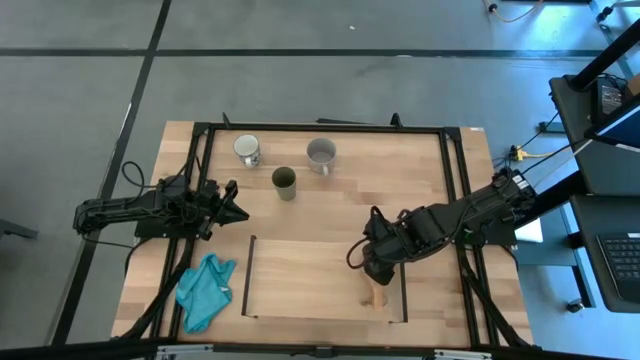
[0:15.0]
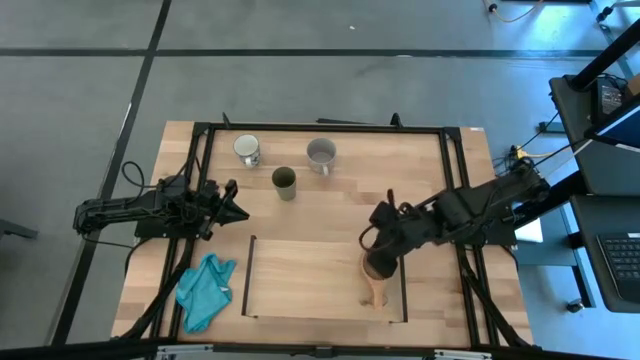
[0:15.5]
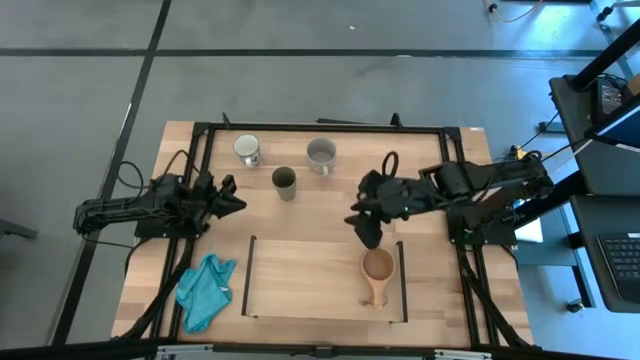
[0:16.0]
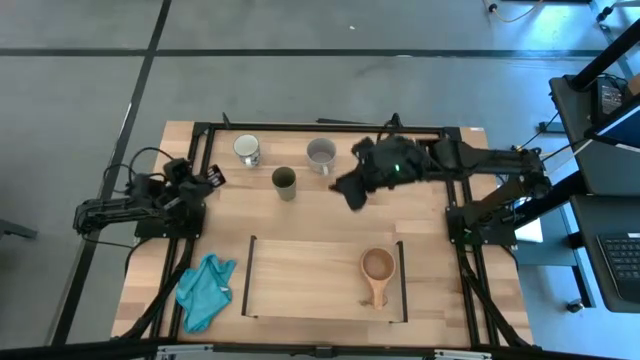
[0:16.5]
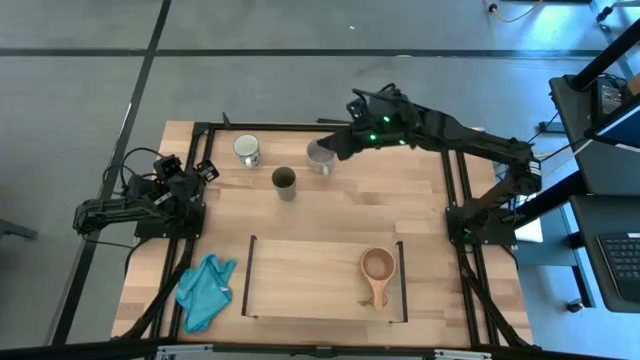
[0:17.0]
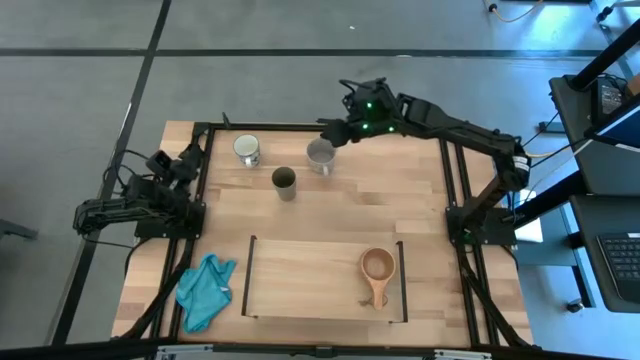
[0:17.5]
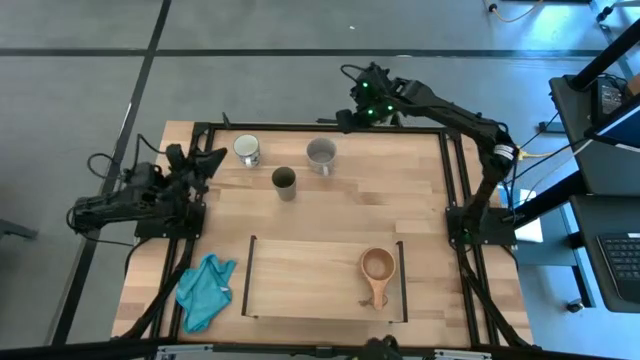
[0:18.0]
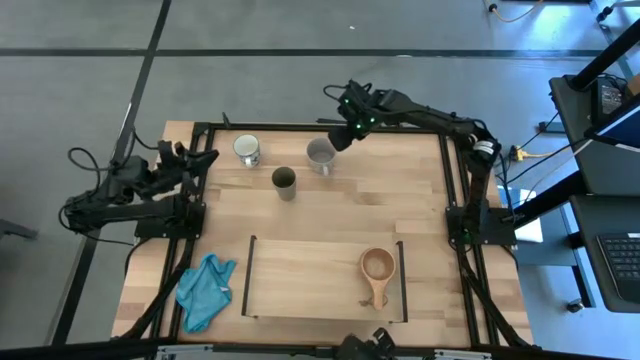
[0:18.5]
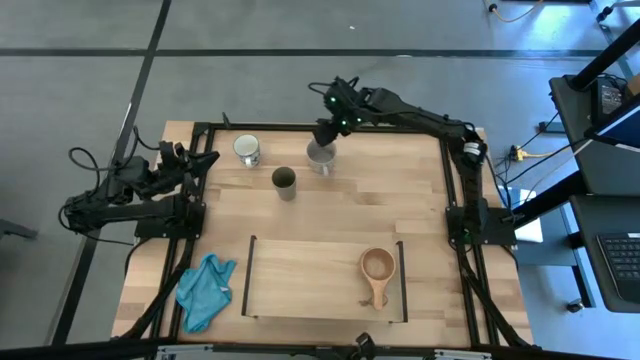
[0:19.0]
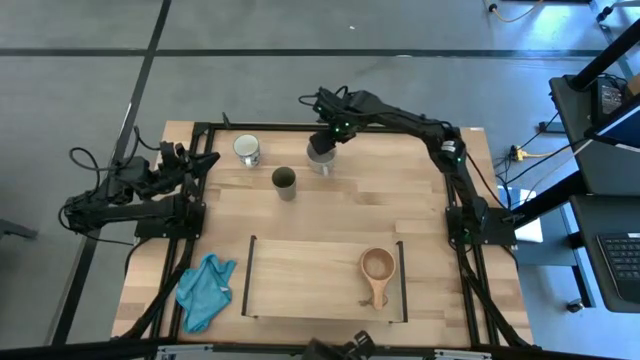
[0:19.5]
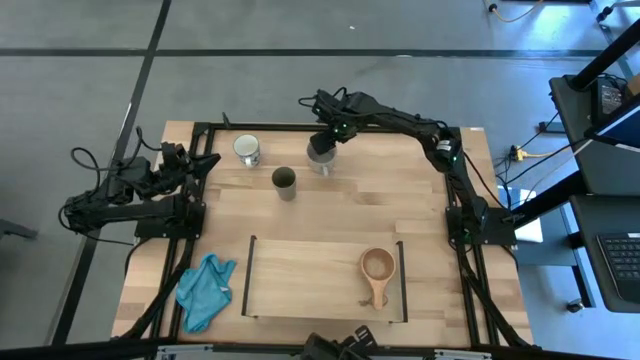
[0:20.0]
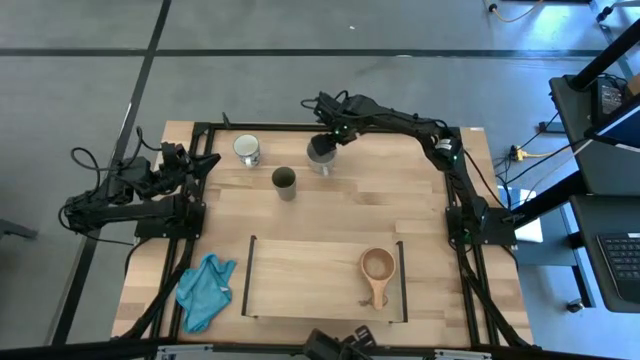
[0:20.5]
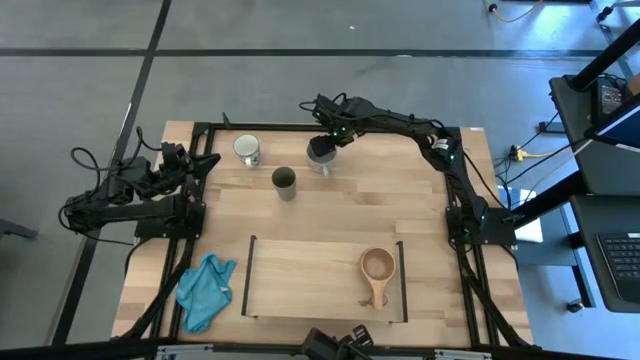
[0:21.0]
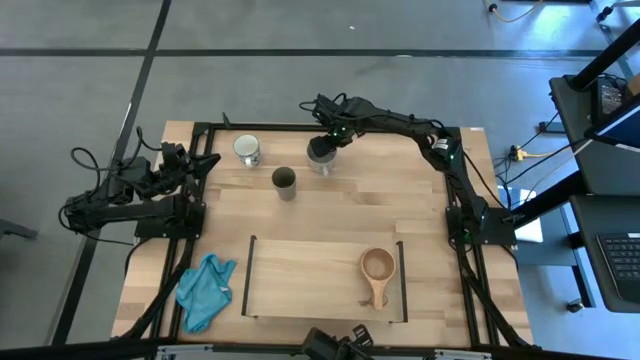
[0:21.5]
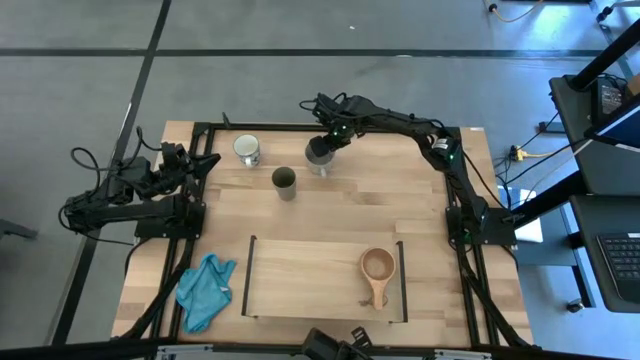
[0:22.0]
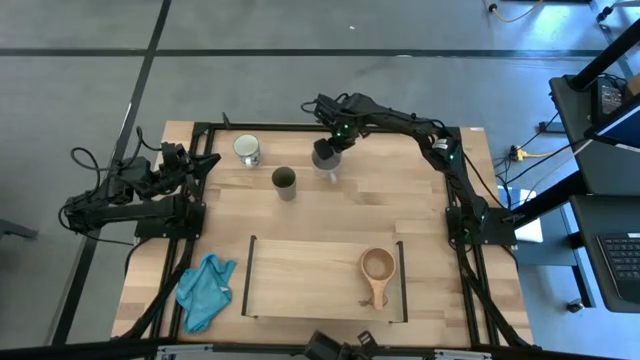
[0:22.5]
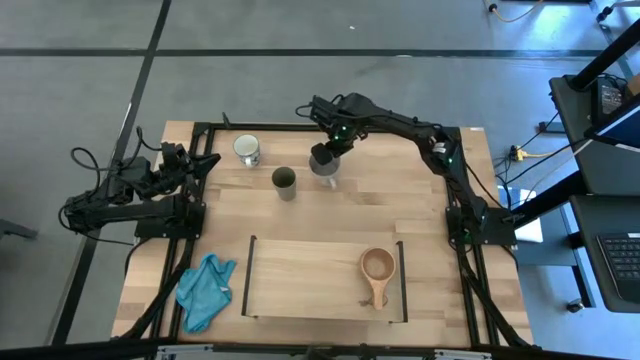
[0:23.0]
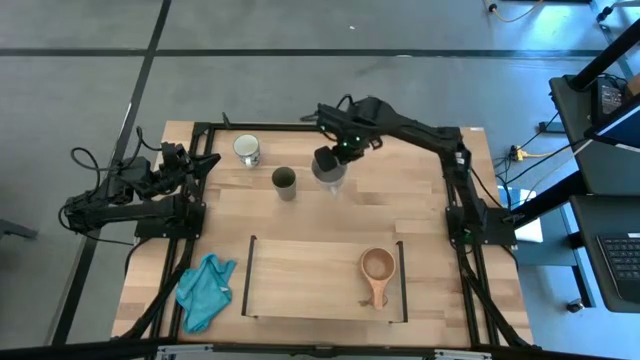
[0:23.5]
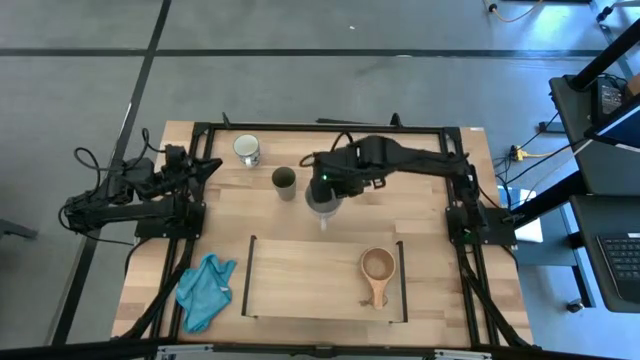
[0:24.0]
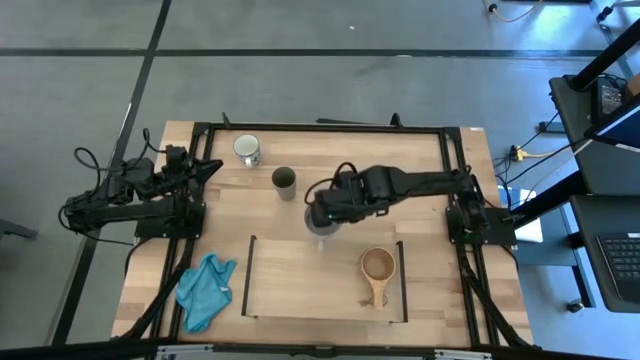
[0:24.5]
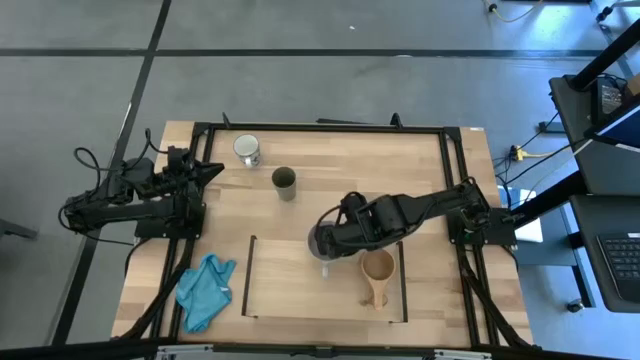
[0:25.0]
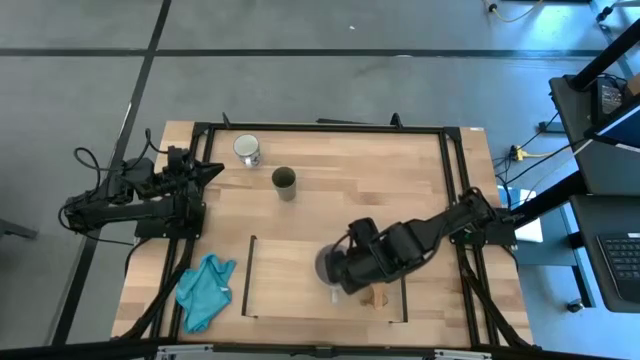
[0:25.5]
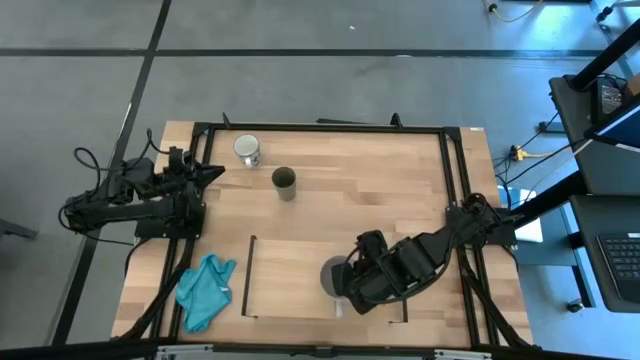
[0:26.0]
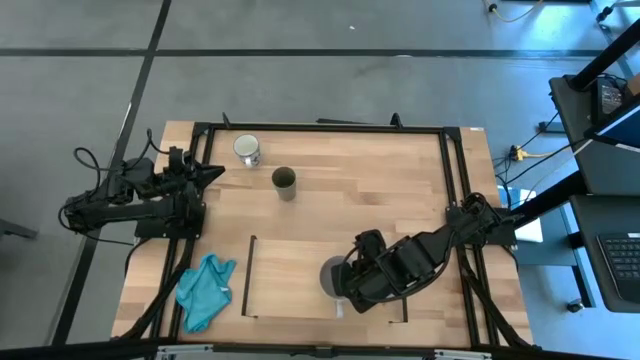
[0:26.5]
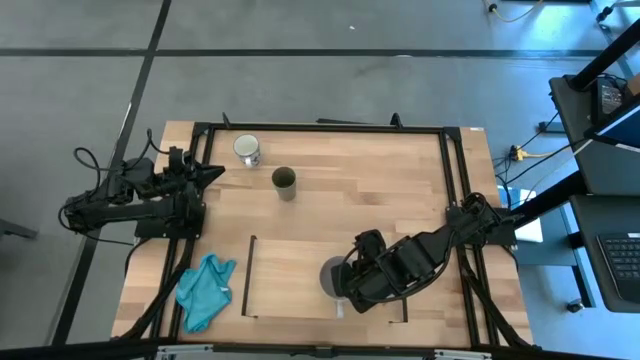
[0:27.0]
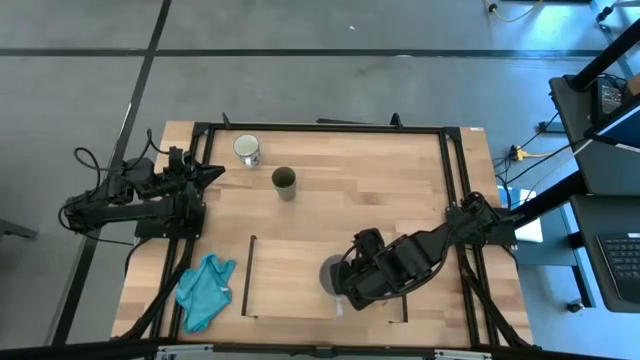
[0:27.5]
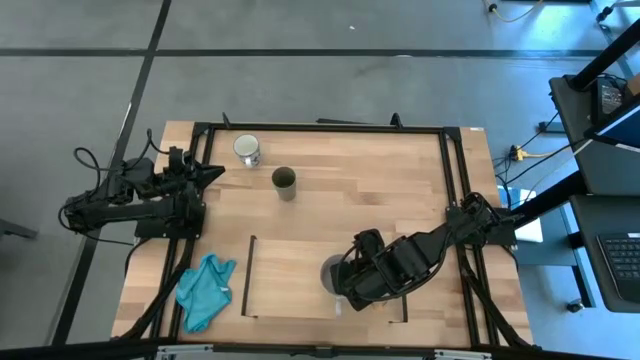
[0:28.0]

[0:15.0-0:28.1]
Task: Stack small to large cups/mugs on shelf
Put the gray mug on the shelf

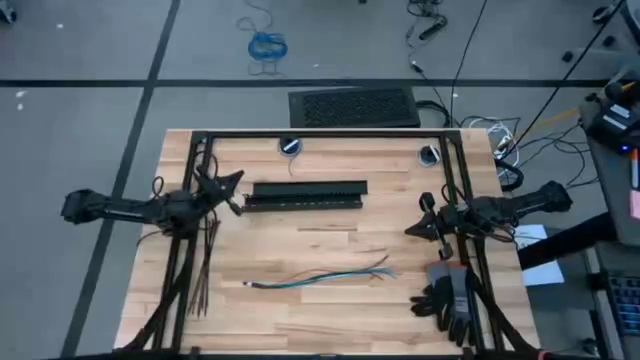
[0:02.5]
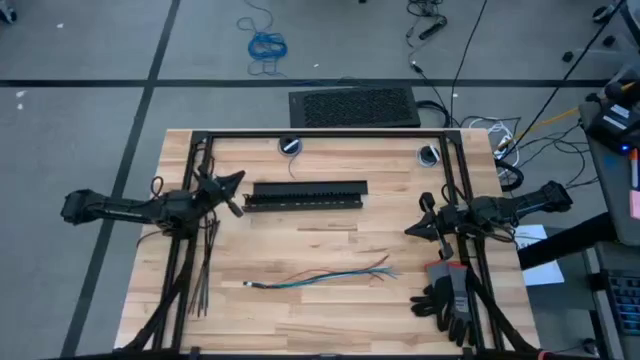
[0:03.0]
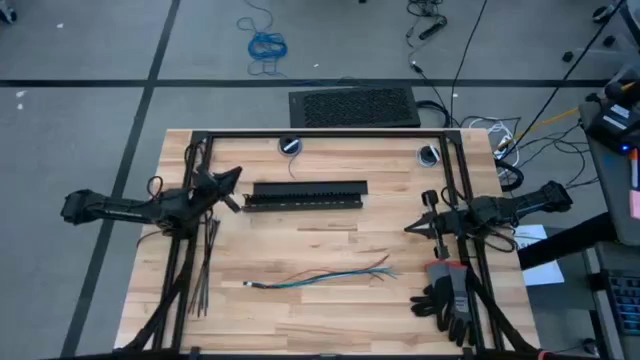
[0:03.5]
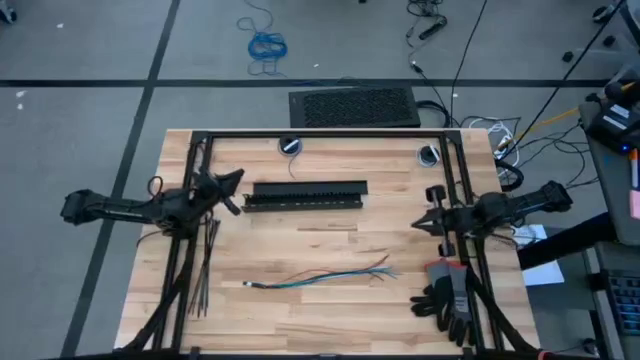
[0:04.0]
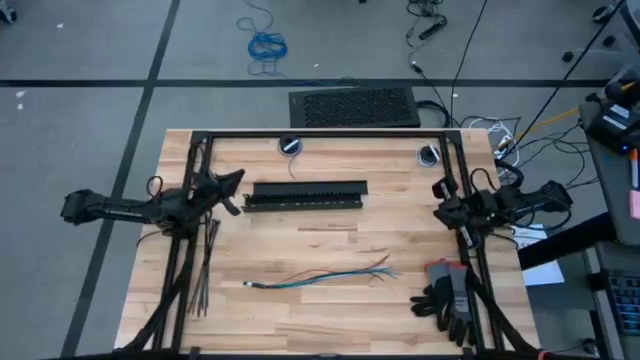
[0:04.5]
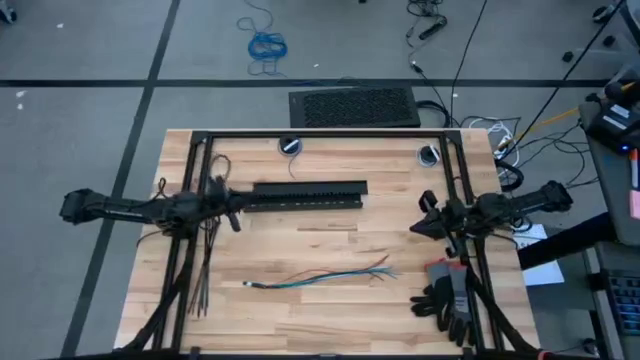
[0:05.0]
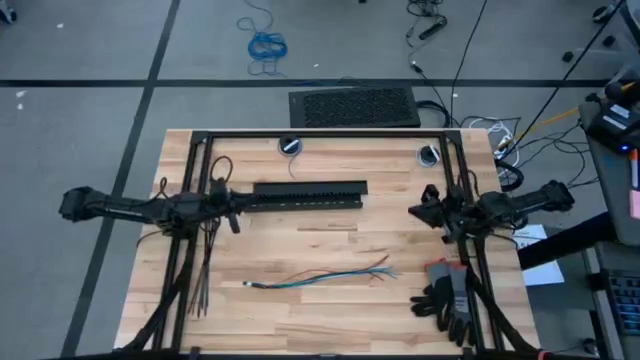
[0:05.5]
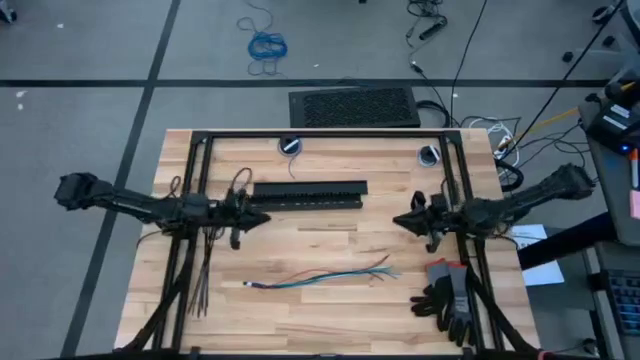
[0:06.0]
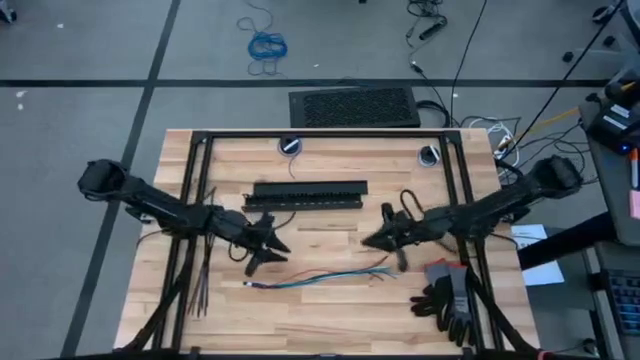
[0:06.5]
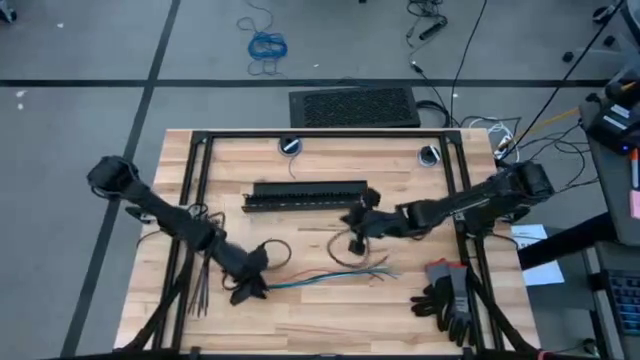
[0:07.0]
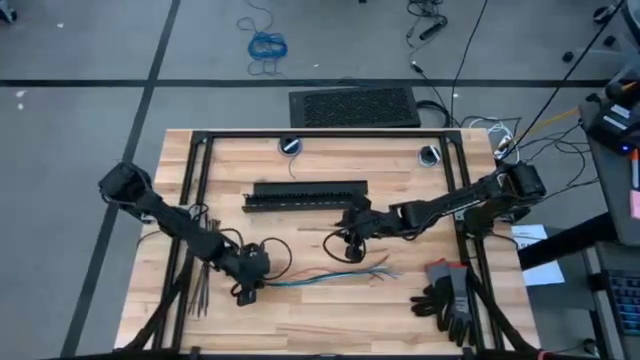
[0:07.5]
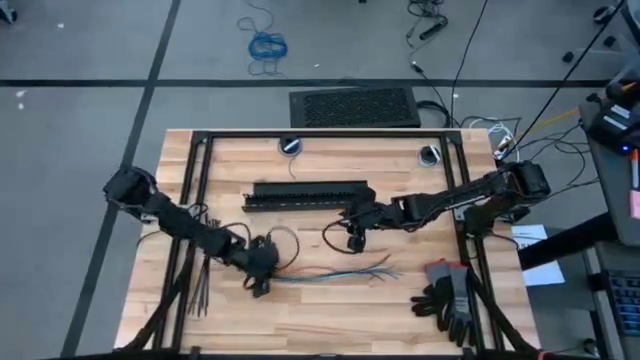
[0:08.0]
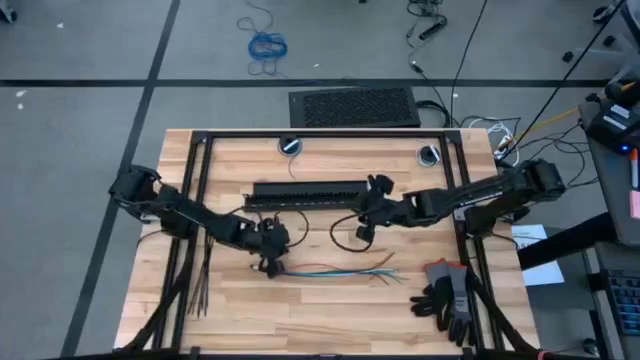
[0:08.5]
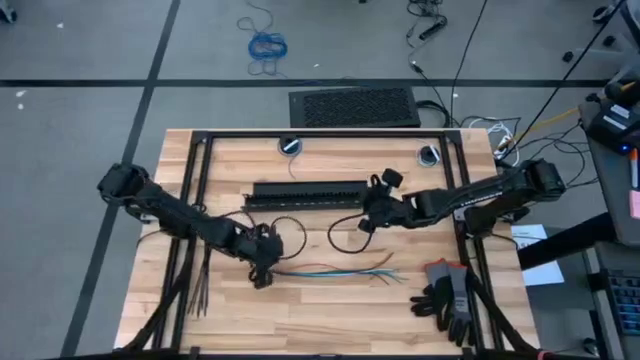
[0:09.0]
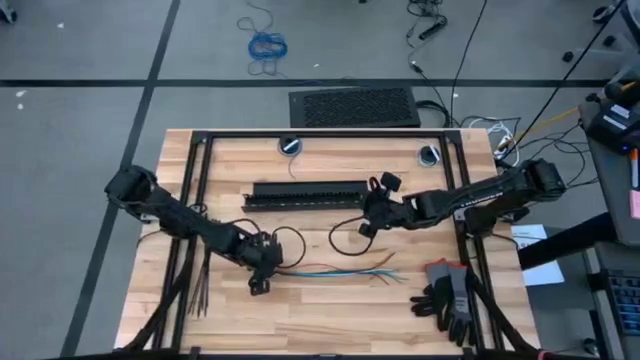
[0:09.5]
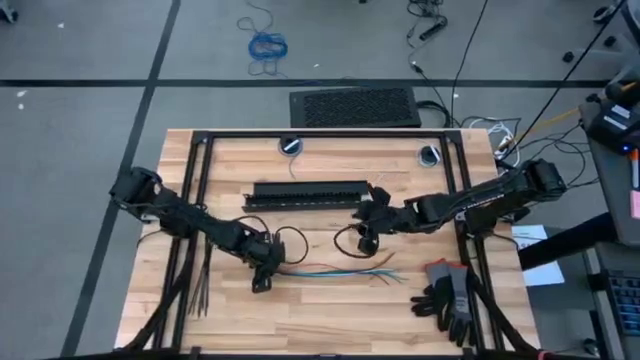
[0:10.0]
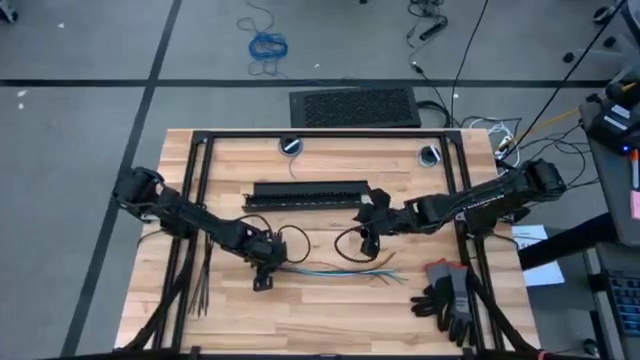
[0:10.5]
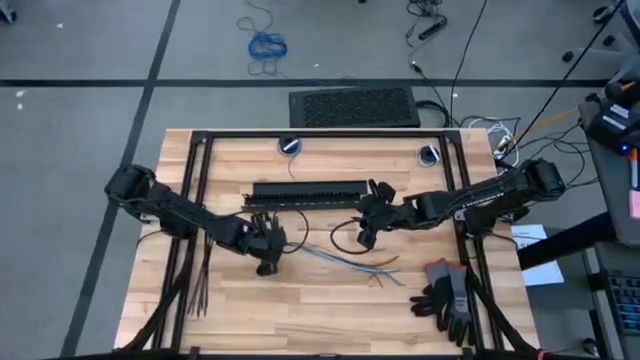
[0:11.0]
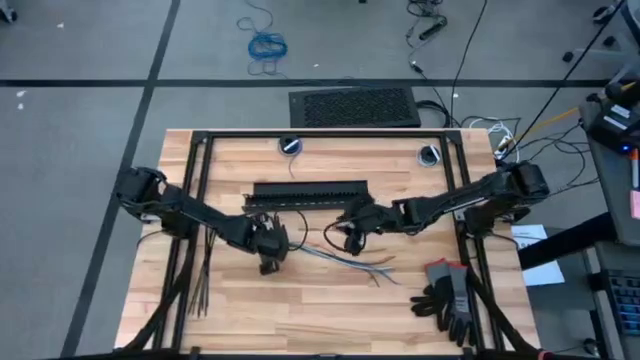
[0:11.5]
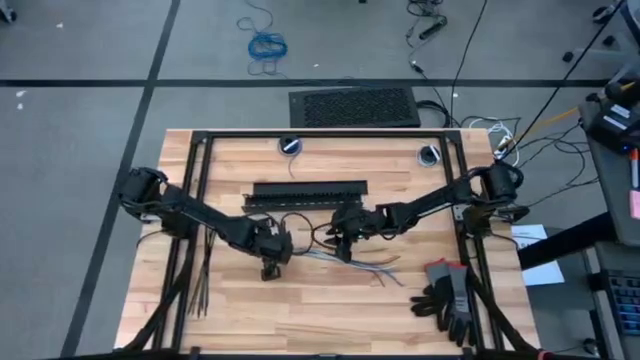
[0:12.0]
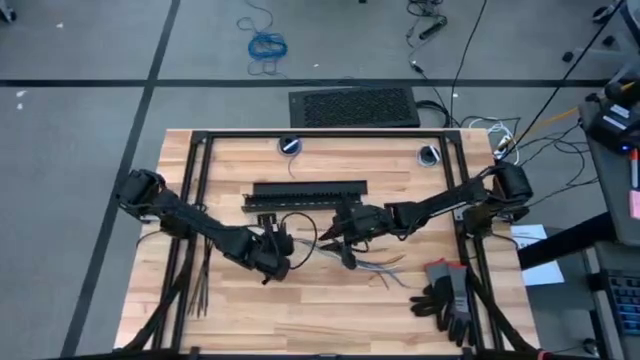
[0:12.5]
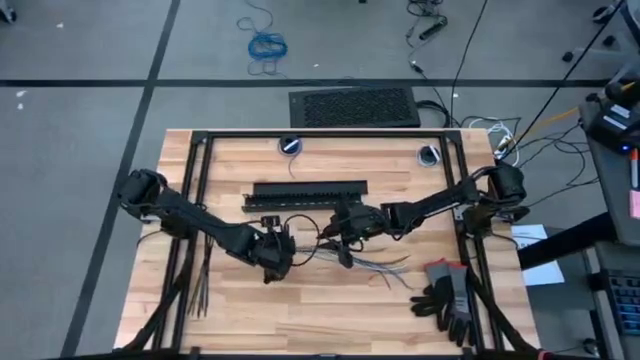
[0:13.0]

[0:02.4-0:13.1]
Task: Ziptie cables
Adjust the cable wires
